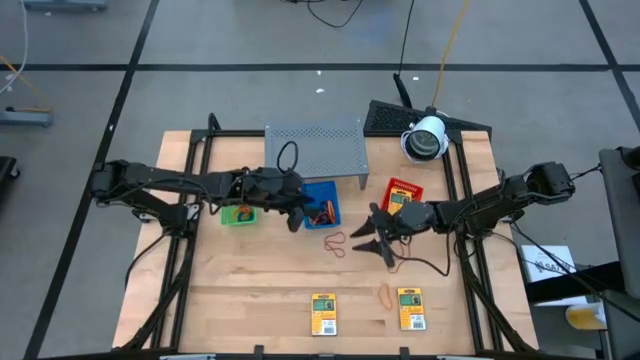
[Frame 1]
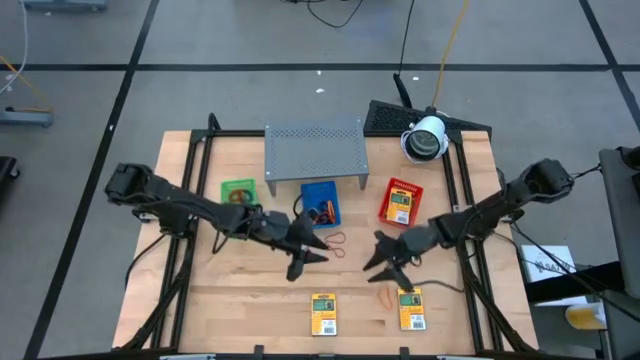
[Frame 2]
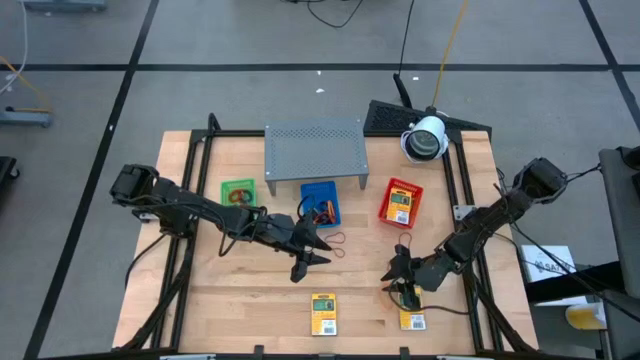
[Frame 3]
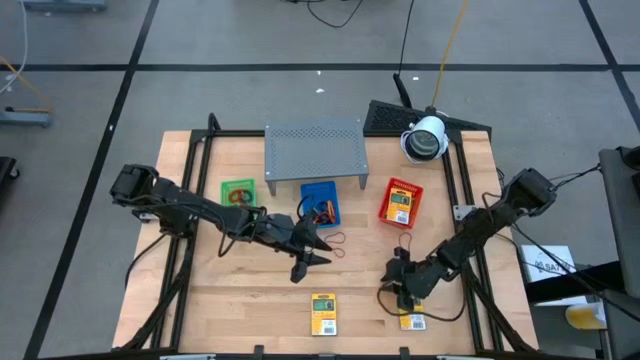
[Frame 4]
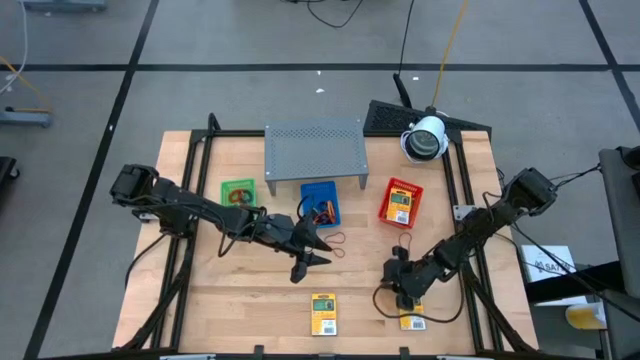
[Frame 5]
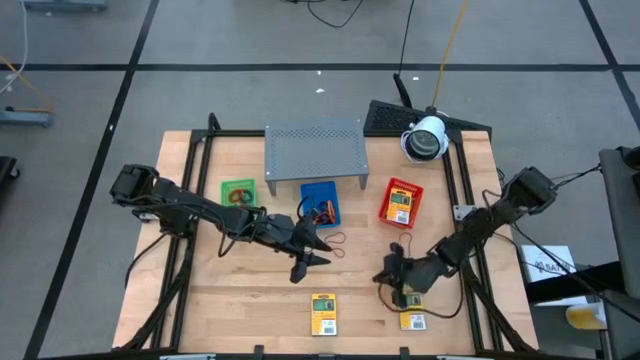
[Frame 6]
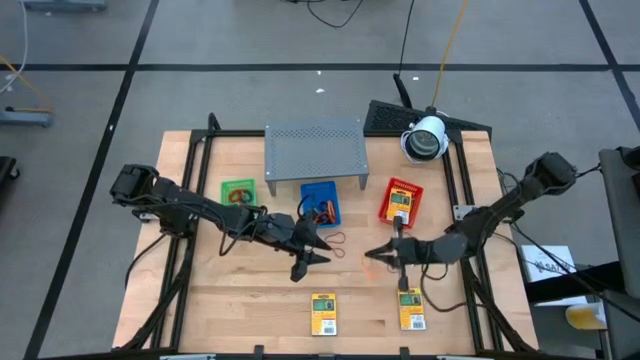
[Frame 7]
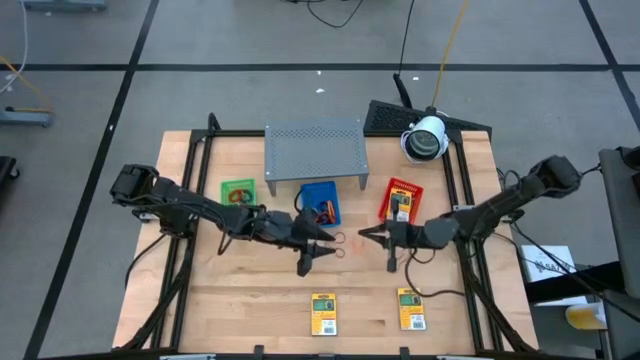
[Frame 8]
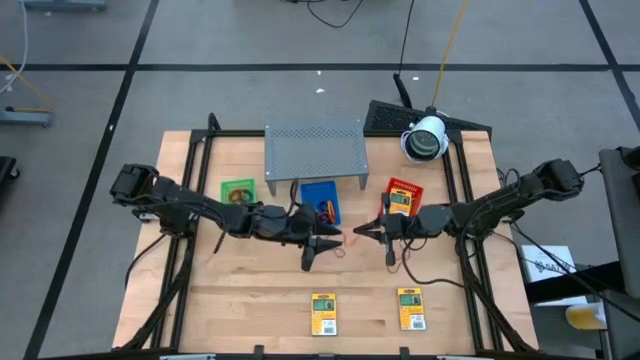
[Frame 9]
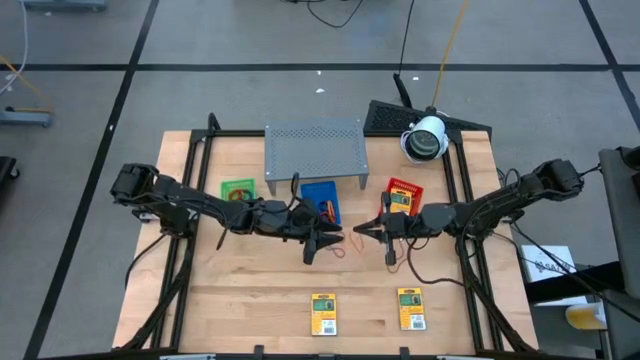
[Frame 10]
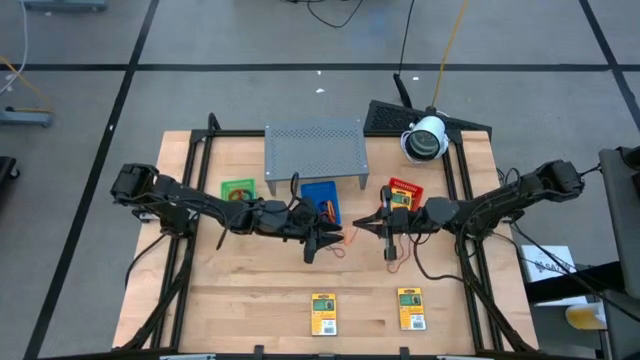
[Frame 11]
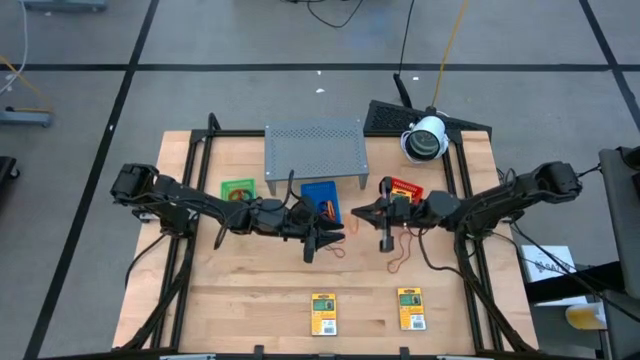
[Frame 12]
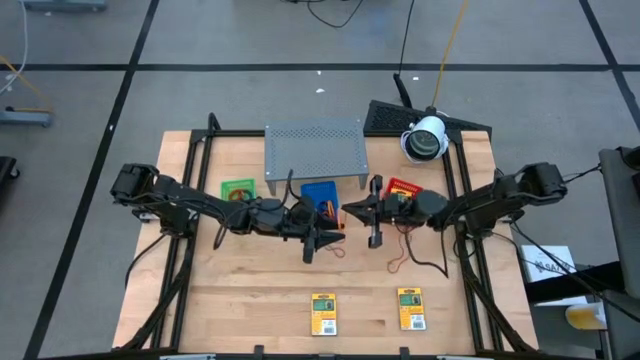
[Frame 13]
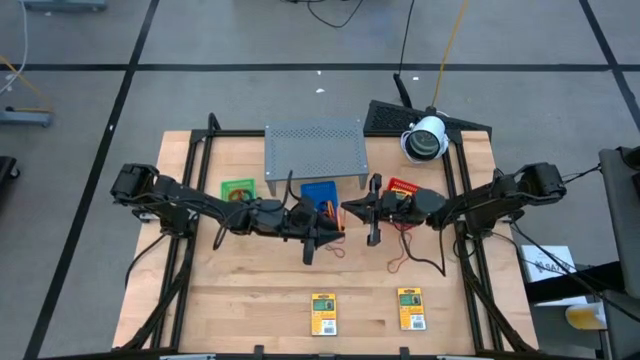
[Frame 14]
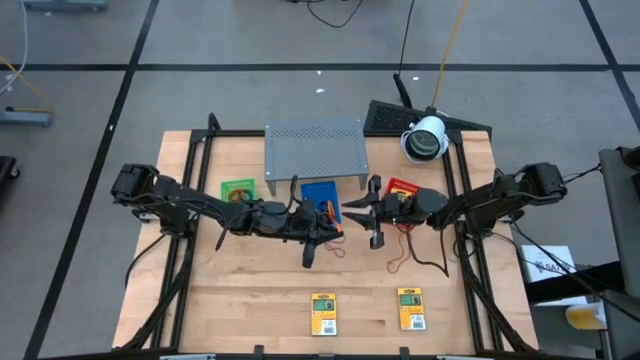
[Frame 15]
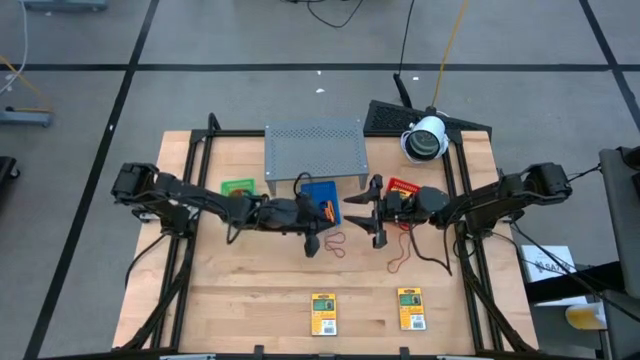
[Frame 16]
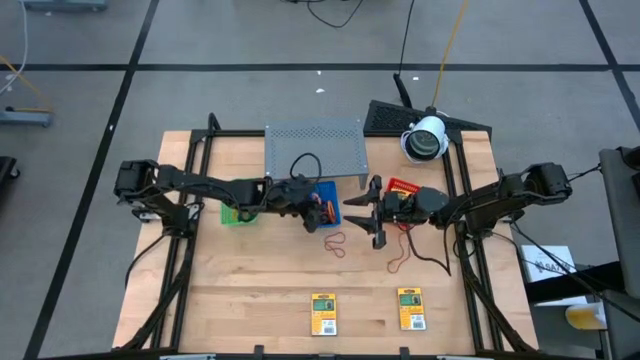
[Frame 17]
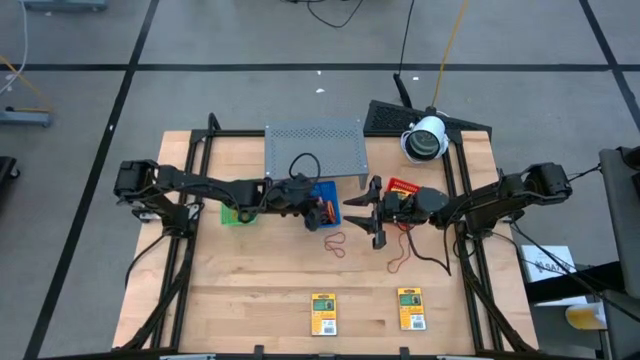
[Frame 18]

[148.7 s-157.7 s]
Task: Pick & Place Office Desk Supplies
Put the orange rubber band into the blue bin

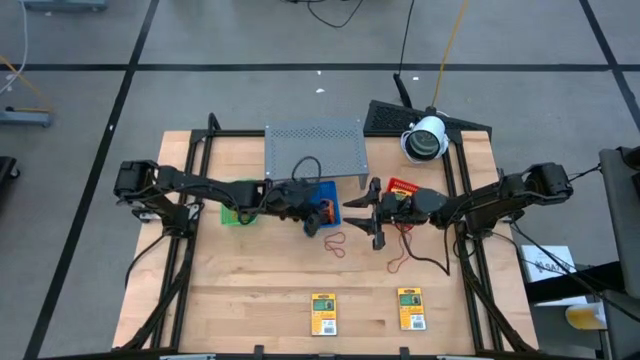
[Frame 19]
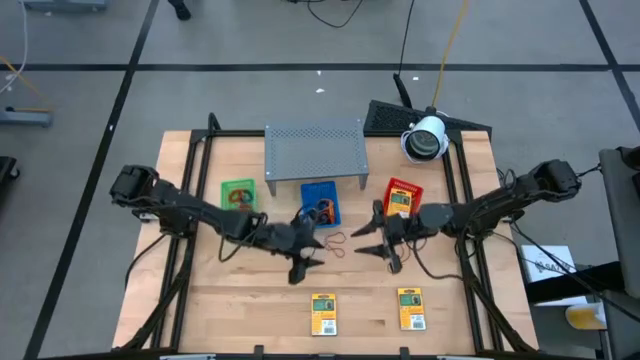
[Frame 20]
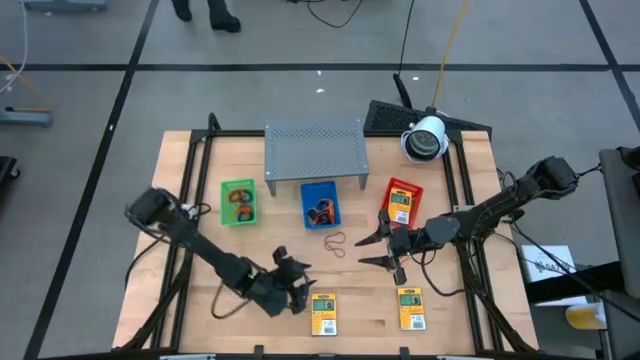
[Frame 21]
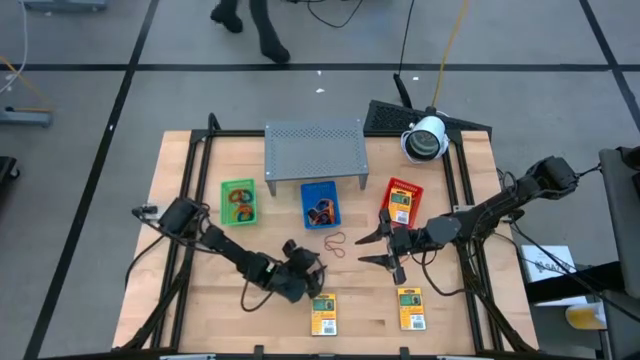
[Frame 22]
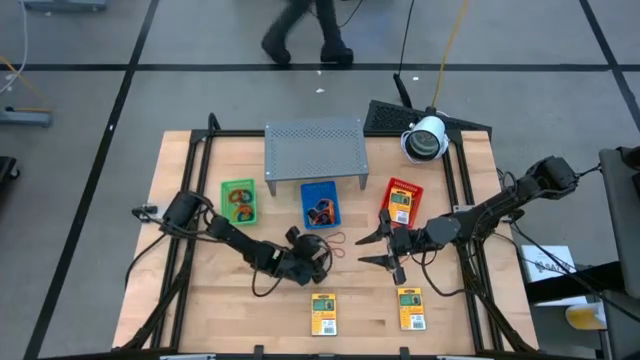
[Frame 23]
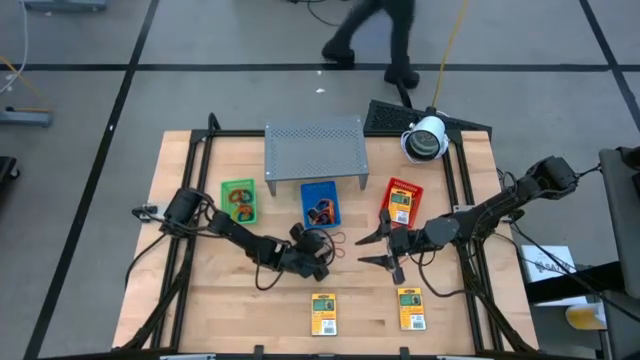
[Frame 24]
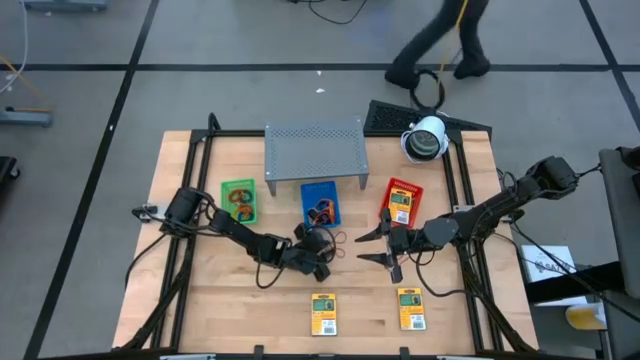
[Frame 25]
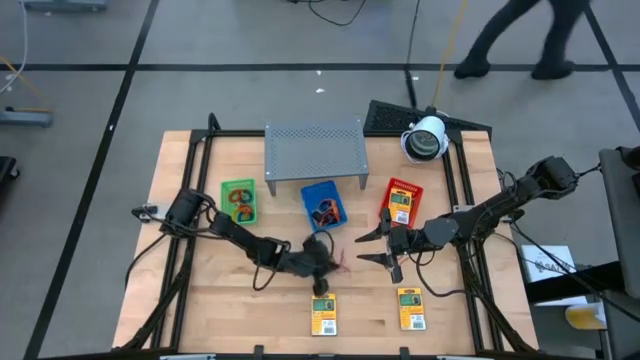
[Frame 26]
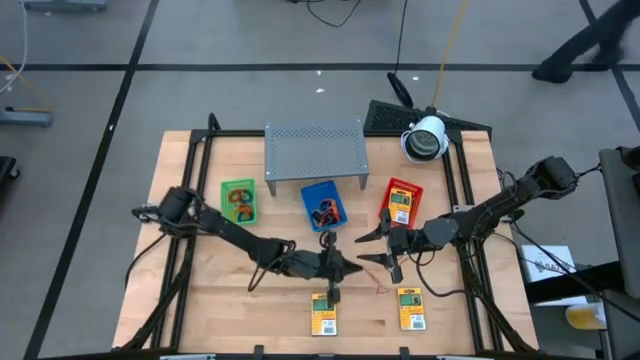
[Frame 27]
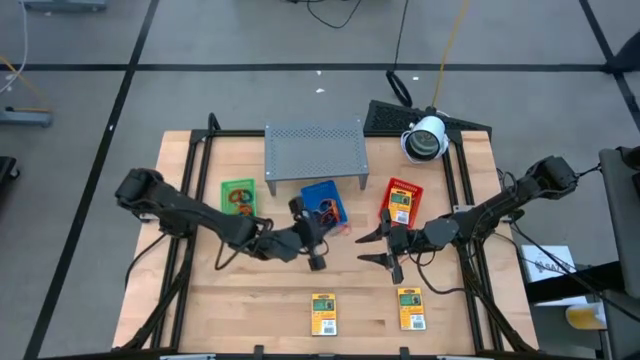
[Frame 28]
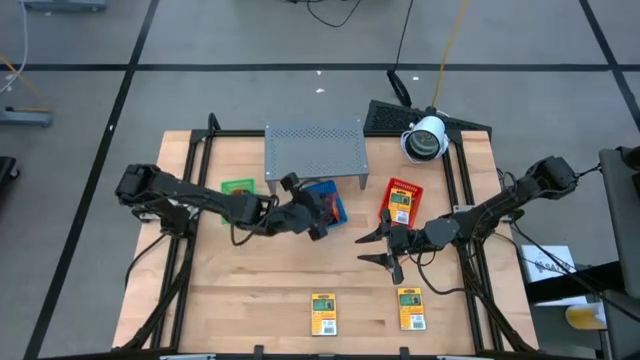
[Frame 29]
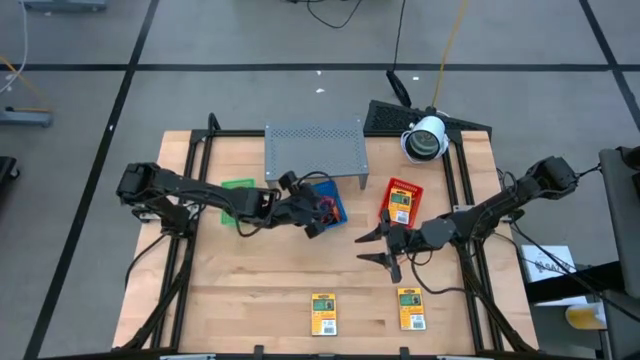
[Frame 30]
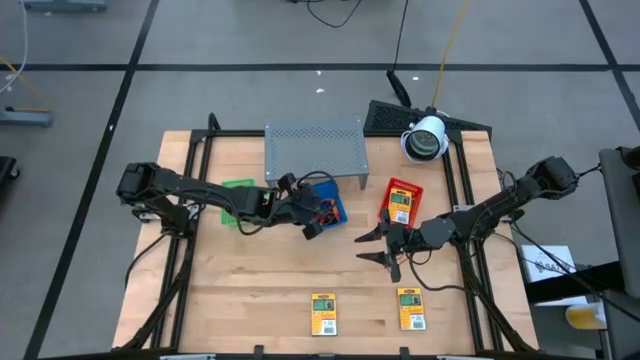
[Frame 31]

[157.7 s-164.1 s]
Put the red rubber band into the blue bin

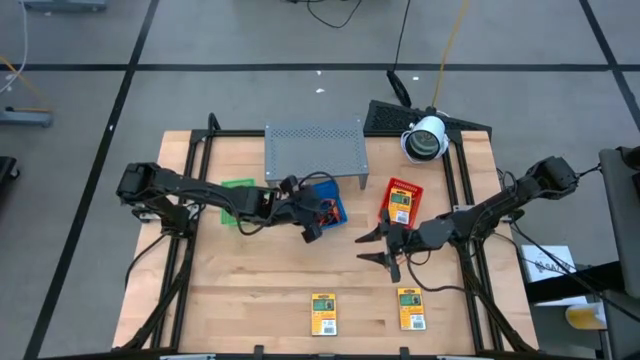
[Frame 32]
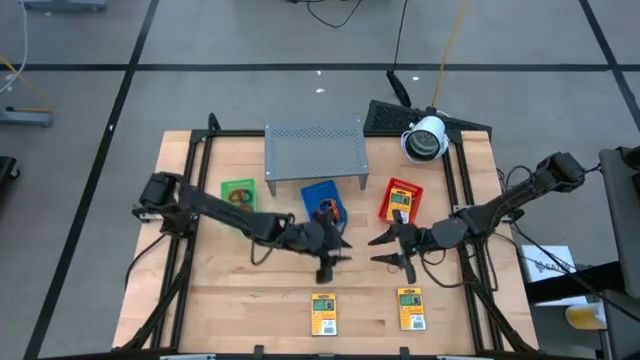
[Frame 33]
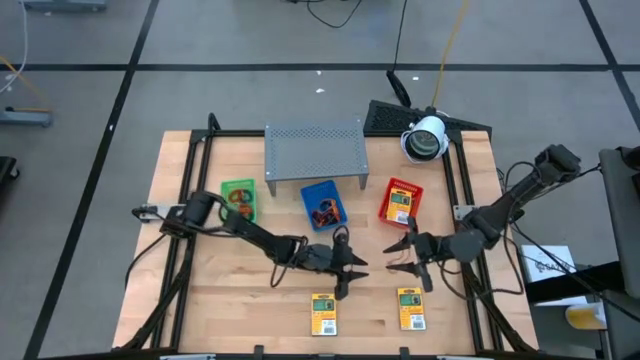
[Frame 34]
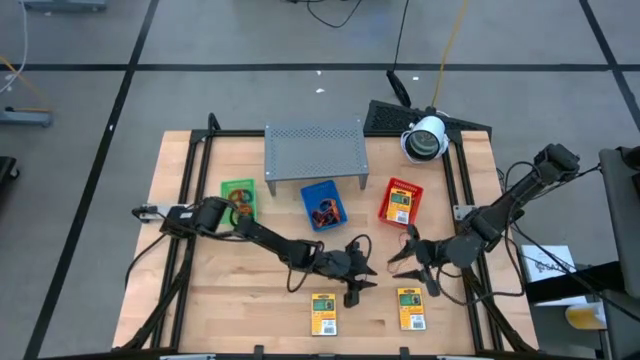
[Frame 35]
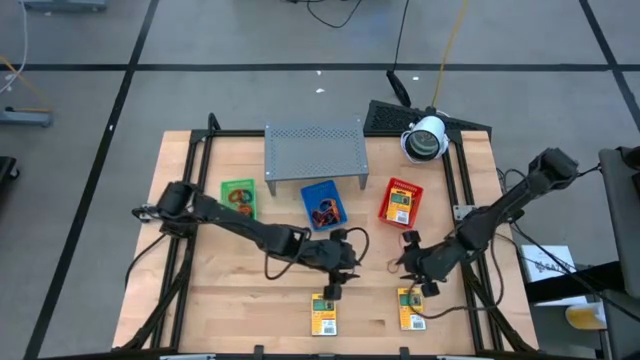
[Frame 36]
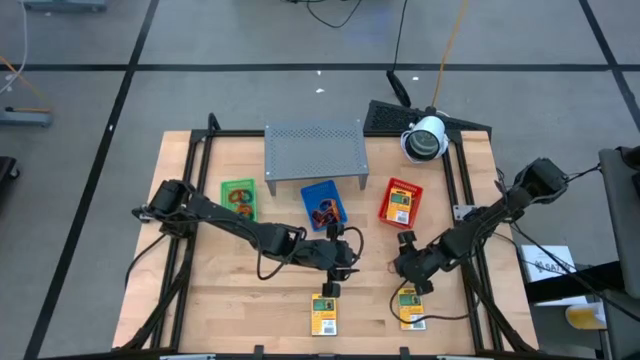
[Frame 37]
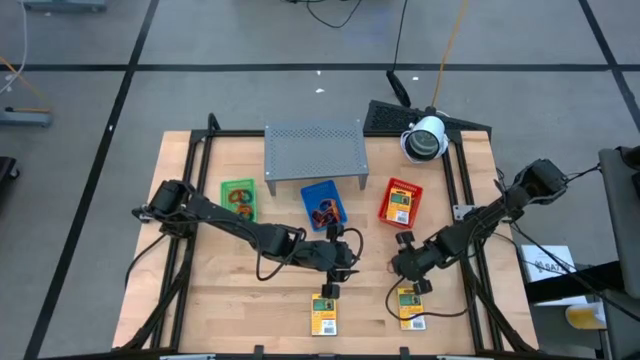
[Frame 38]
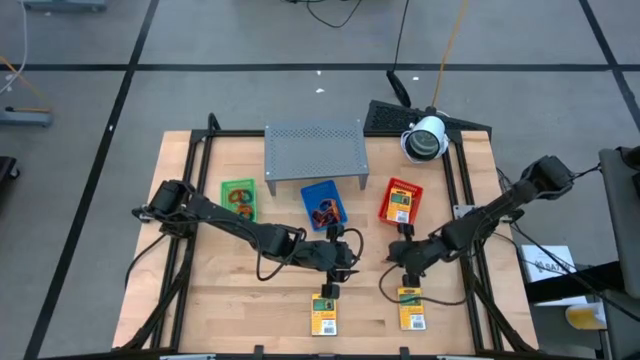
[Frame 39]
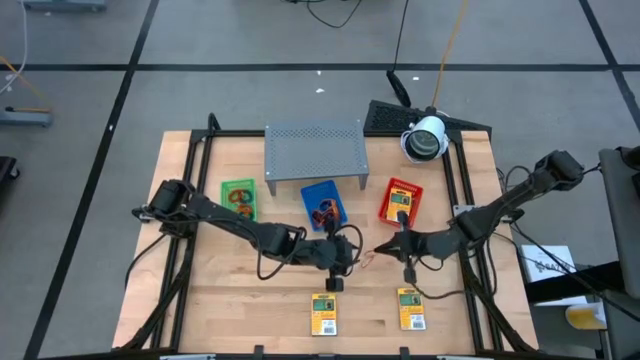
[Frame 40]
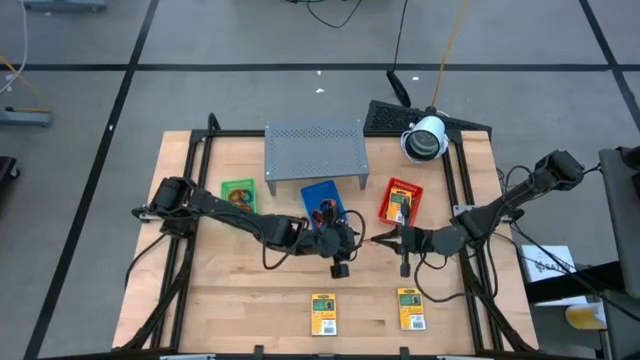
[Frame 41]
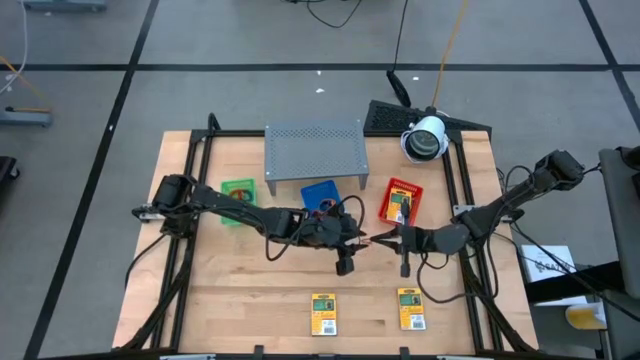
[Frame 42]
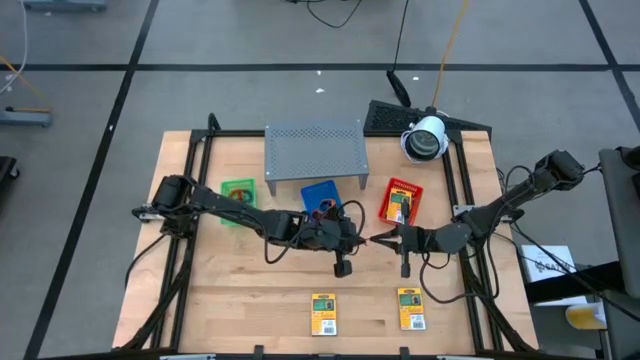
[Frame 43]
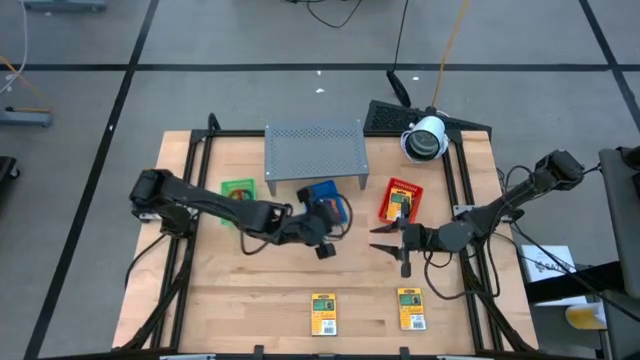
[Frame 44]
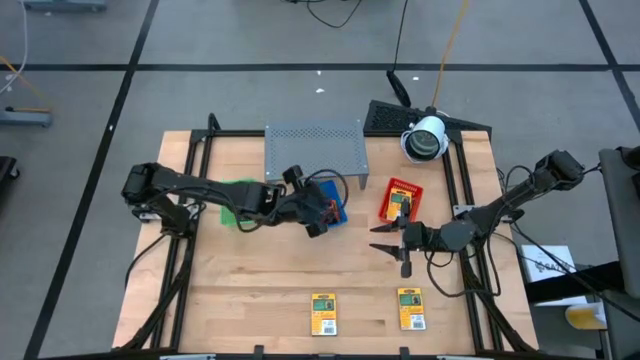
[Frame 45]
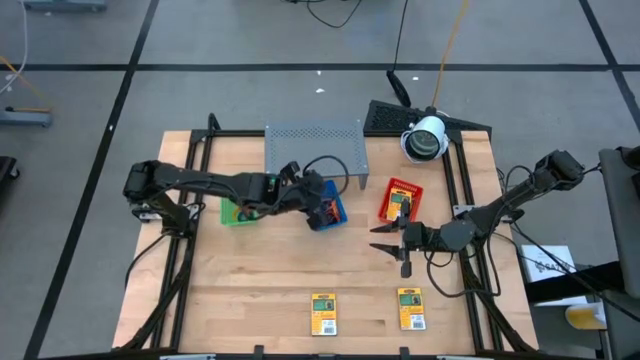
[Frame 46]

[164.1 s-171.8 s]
Put the red rubber band into the blue bin
